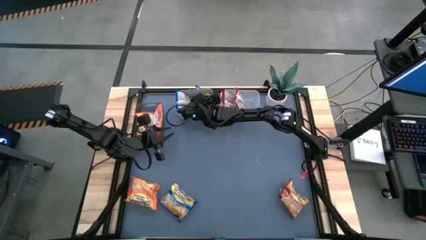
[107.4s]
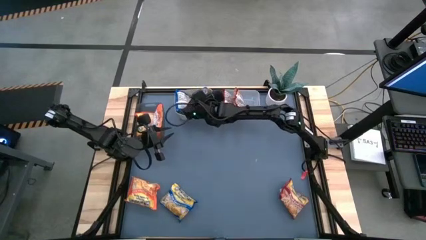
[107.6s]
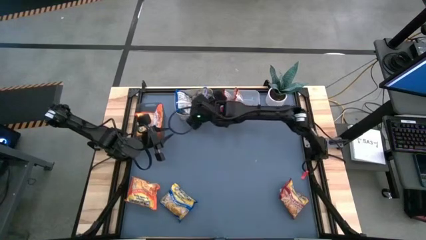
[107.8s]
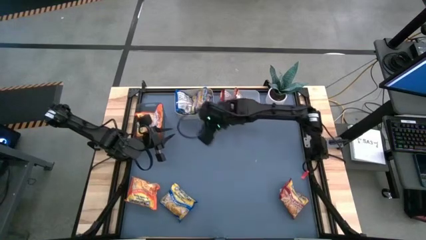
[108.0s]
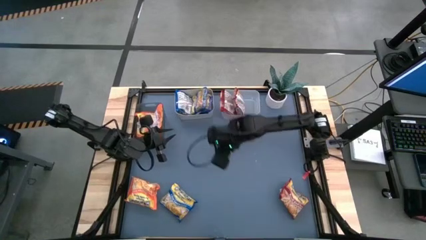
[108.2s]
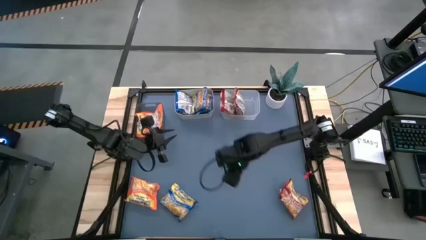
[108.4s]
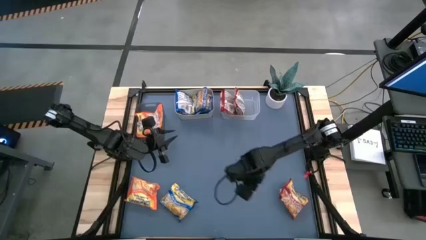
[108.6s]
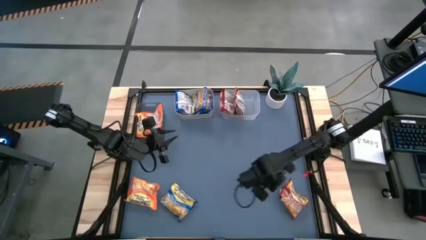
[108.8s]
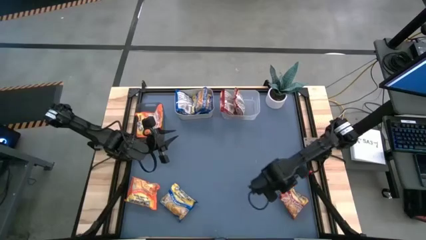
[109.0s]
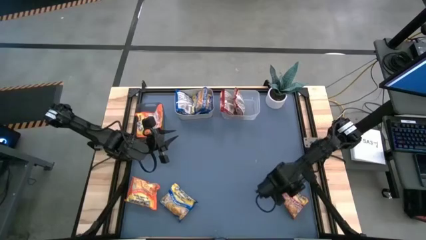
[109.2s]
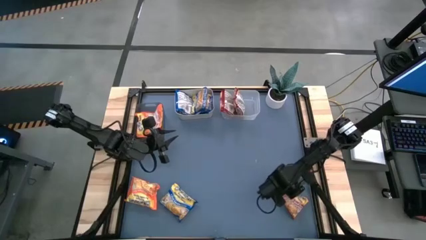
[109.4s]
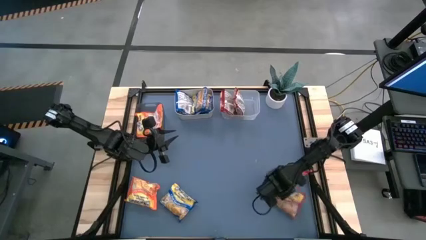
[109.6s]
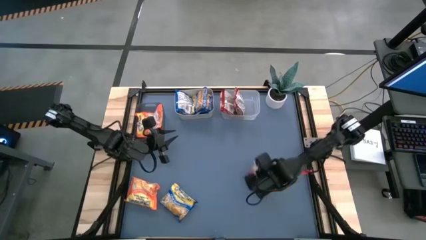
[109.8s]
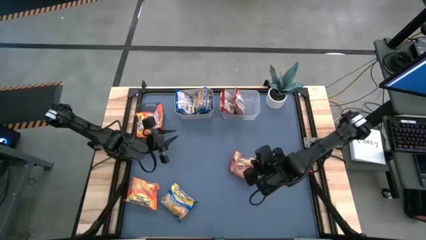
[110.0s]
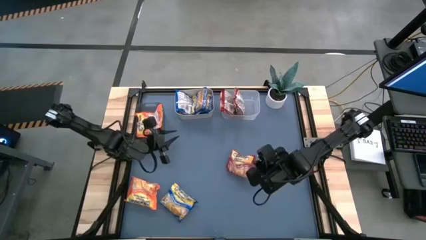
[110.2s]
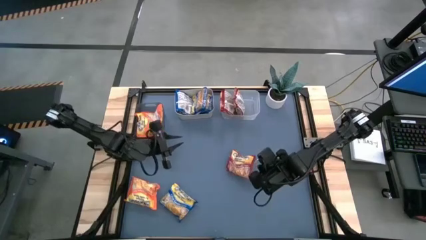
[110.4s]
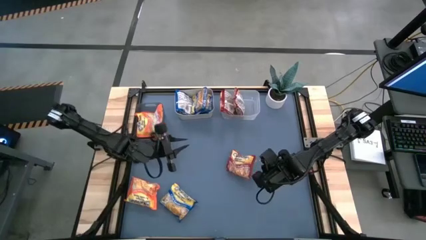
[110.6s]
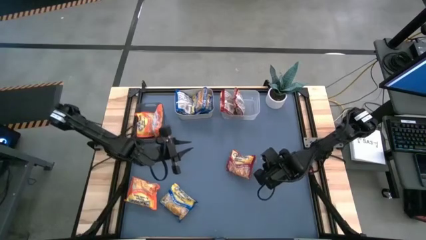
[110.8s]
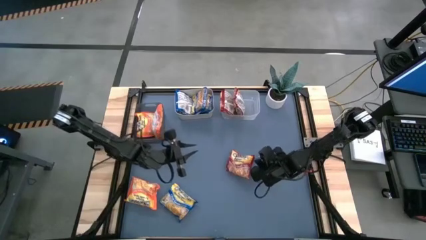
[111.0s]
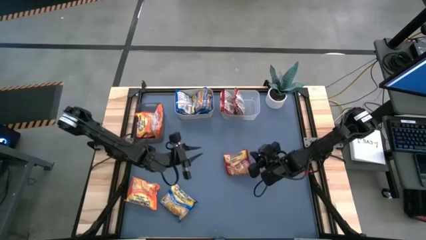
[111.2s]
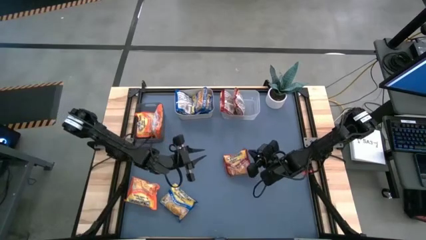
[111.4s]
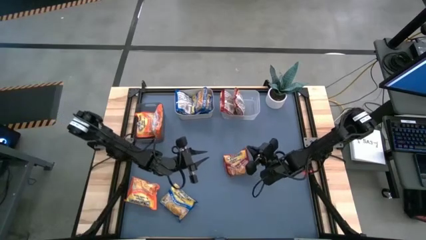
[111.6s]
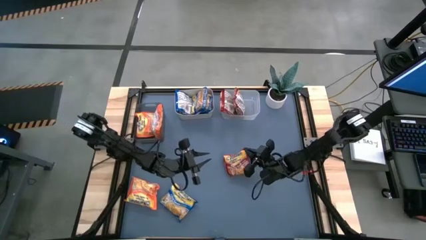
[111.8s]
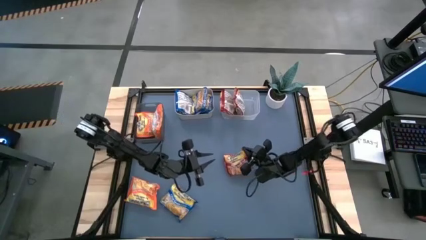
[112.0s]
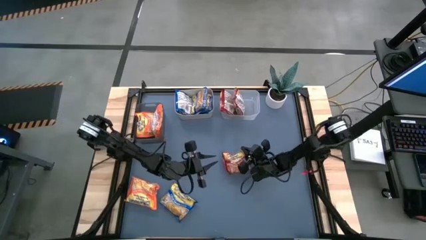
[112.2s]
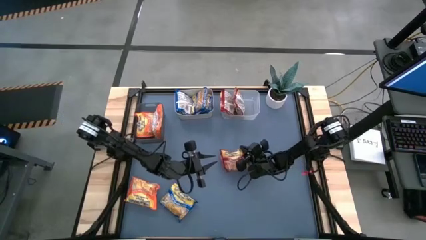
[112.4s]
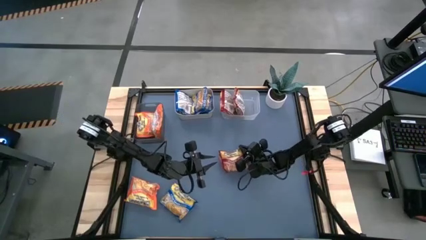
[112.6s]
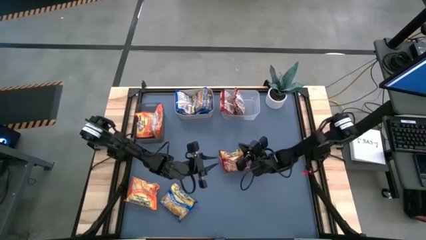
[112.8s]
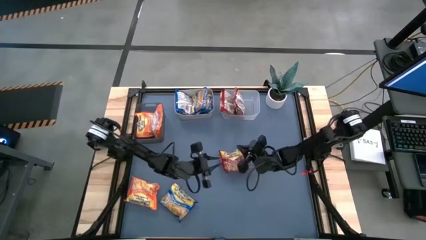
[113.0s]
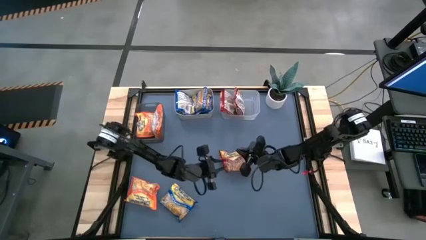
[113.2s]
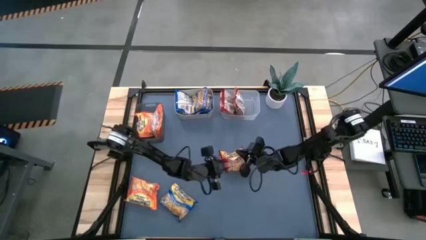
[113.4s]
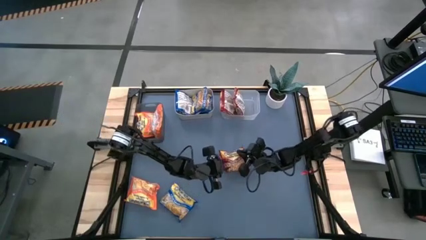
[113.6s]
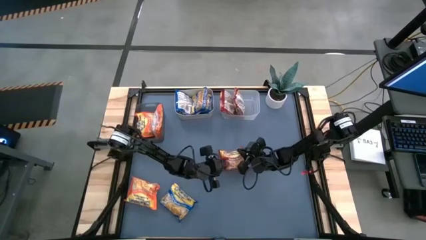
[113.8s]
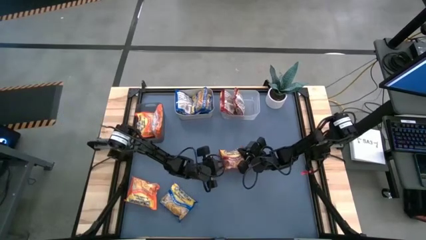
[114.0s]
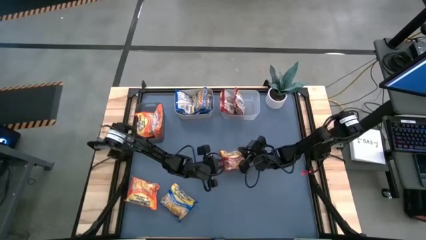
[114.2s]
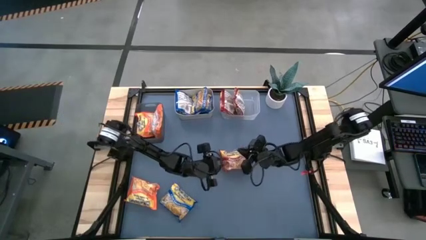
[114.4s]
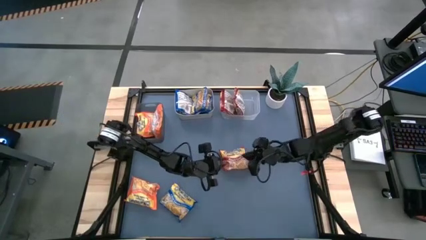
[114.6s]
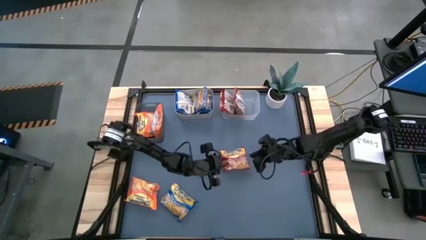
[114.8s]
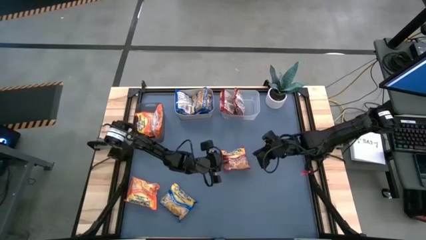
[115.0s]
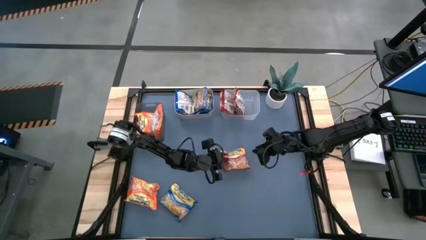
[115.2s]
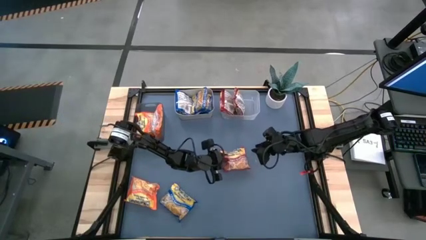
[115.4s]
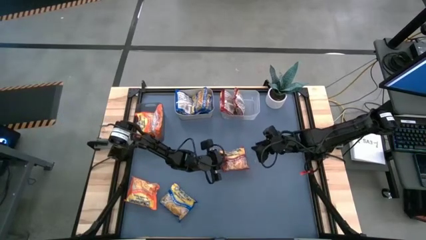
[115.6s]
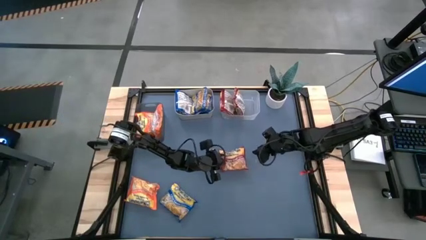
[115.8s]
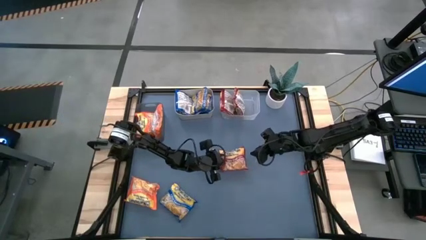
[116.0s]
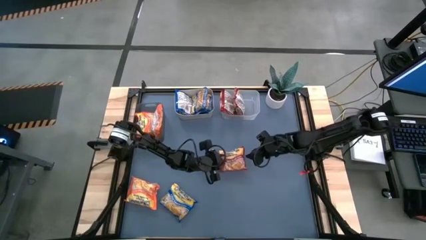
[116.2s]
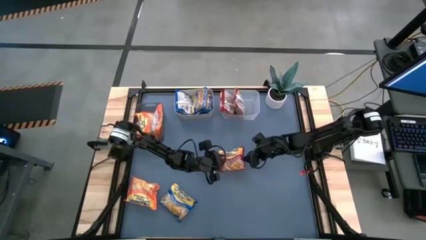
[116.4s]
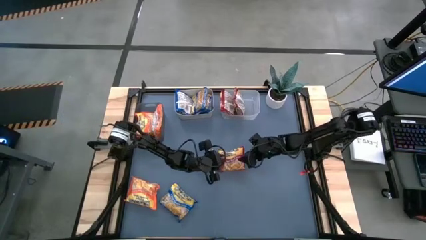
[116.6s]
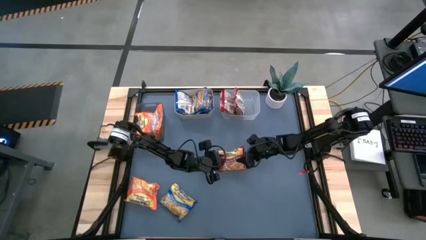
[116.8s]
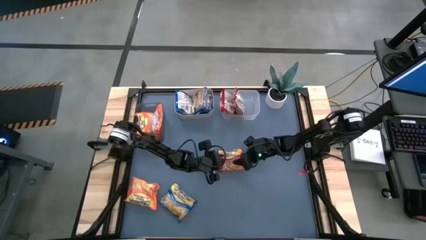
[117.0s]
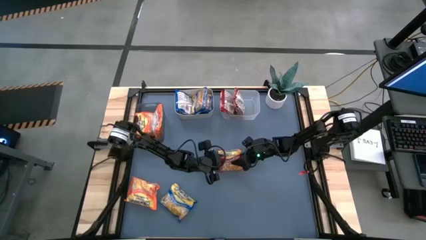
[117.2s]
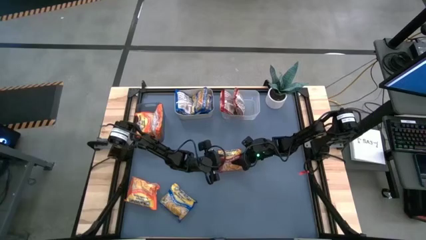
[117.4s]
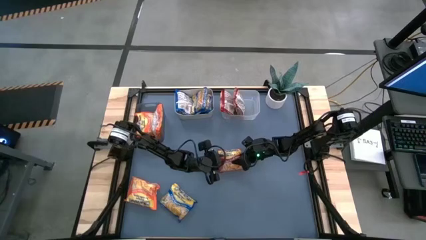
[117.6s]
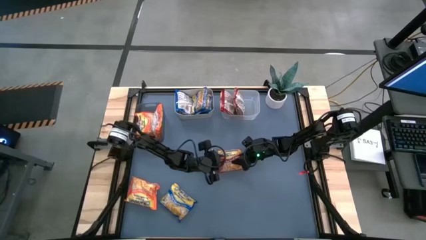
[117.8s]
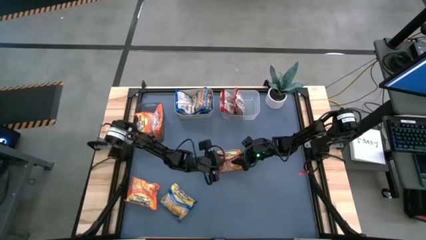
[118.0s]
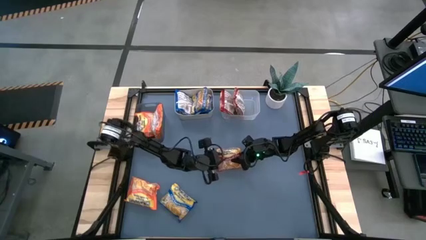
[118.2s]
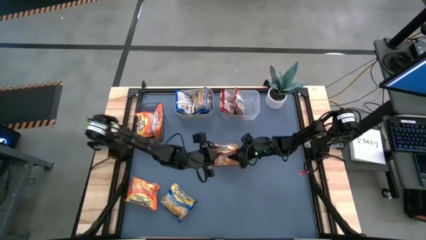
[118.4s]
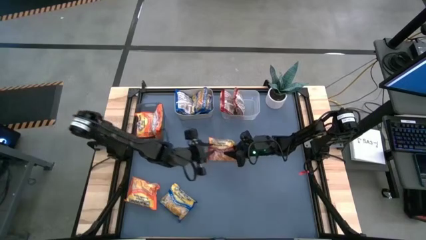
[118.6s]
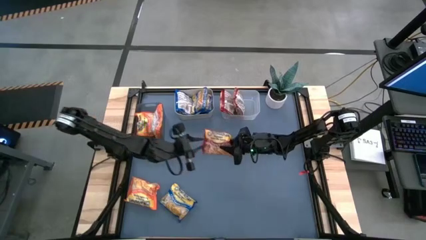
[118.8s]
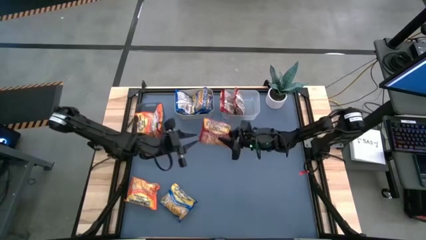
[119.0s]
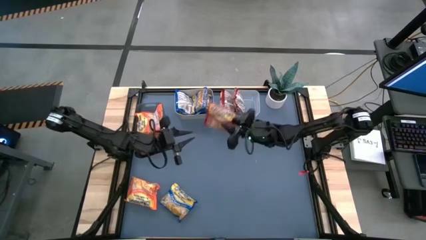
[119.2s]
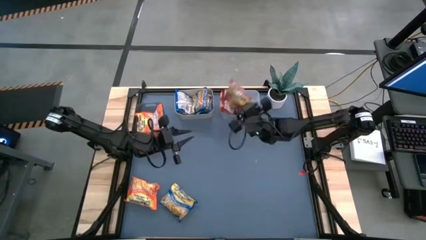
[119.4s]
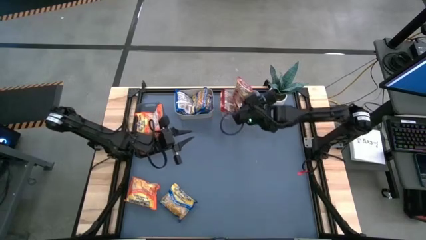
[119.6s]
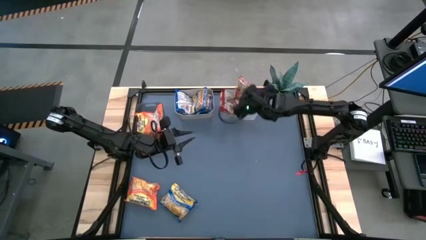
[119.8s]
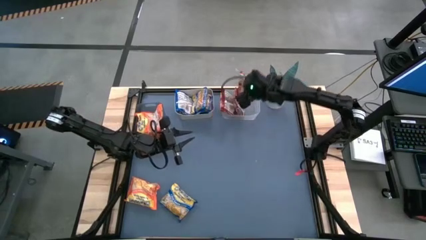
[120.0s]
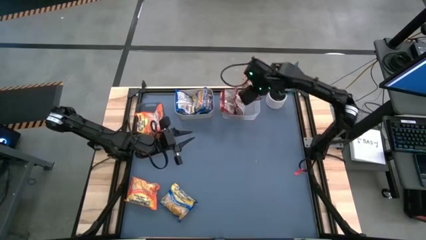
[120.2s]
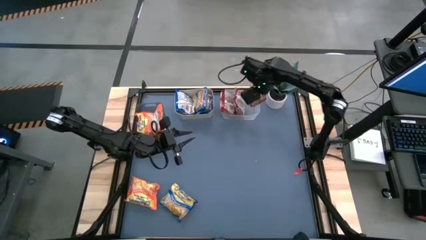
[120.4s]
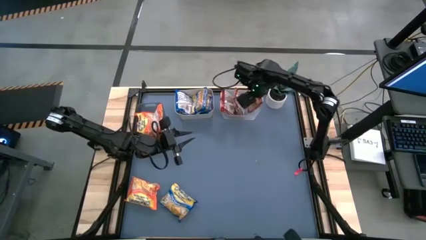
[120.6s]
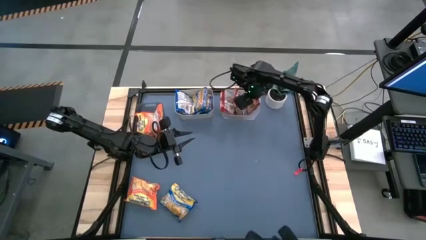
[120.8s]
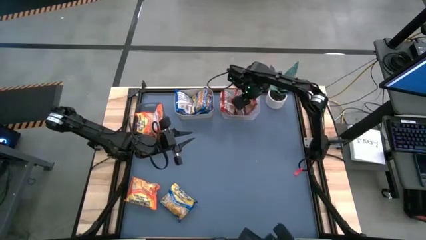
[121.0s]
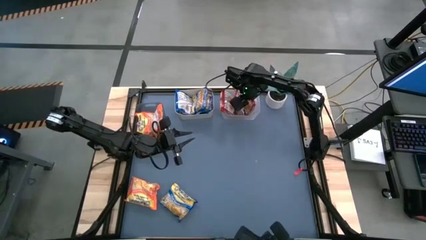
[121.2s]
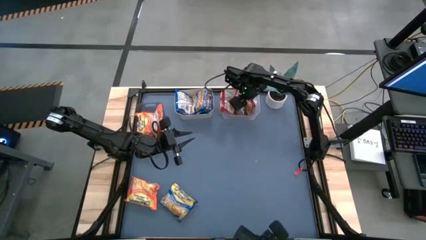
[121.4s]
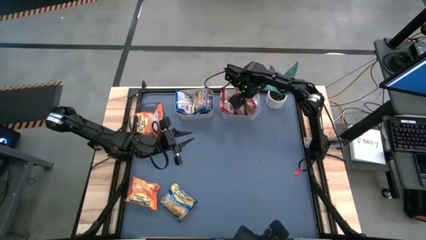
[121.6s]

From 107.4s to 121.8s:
Task: Sort Maruchan noodles
Put the red noodle pack into the transparent bin
